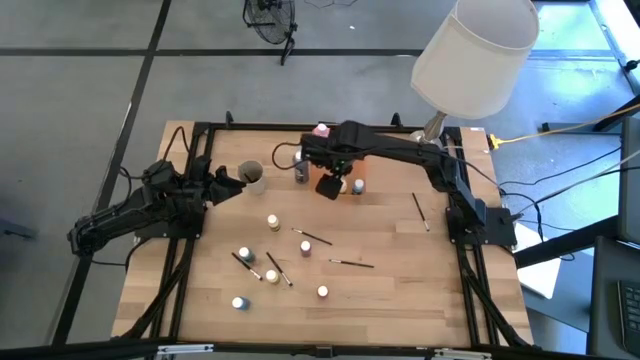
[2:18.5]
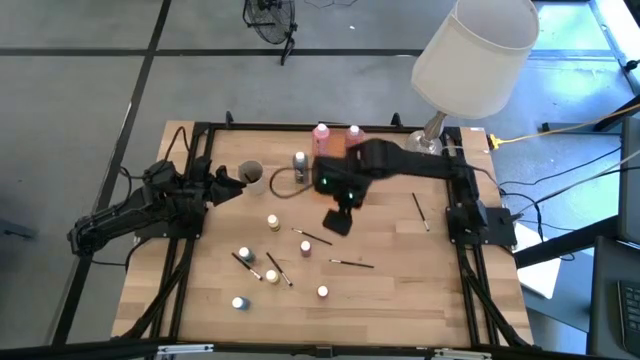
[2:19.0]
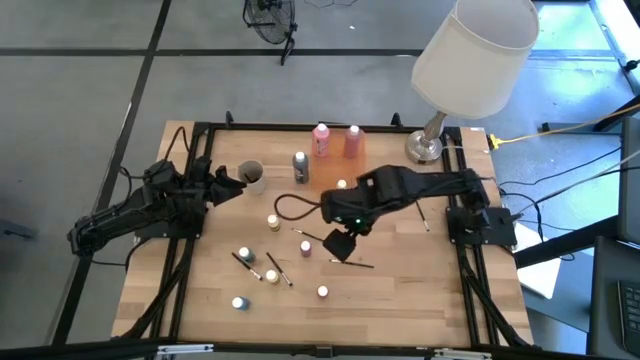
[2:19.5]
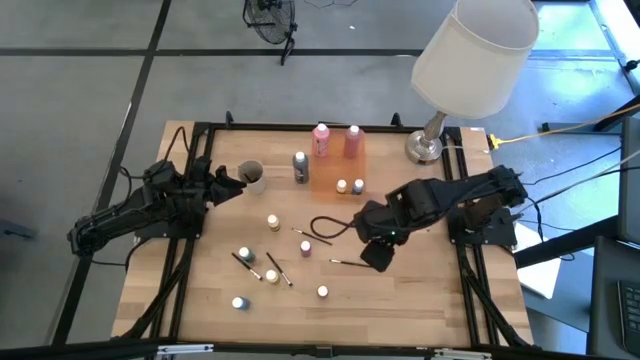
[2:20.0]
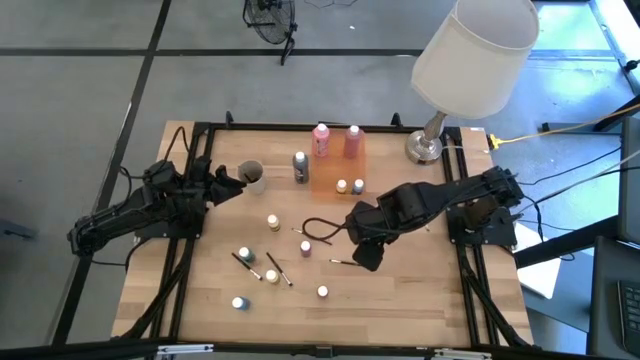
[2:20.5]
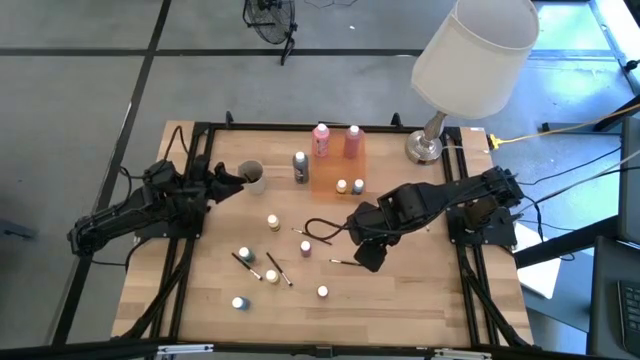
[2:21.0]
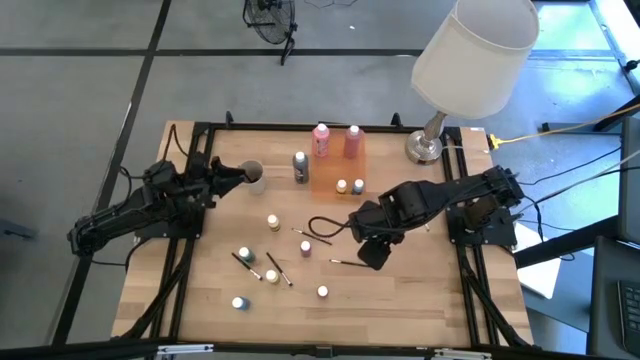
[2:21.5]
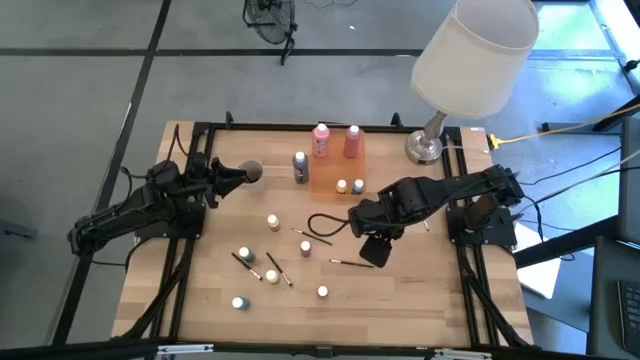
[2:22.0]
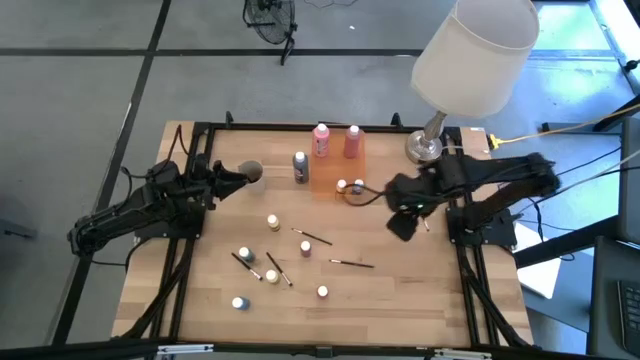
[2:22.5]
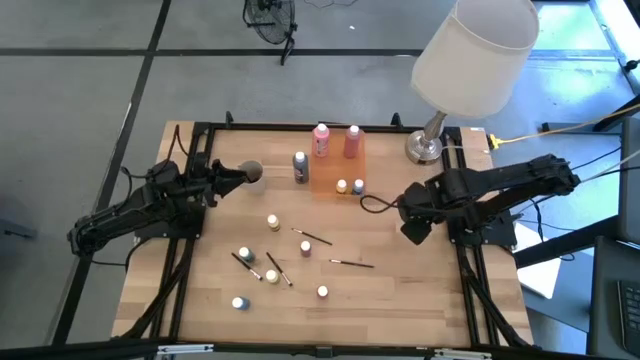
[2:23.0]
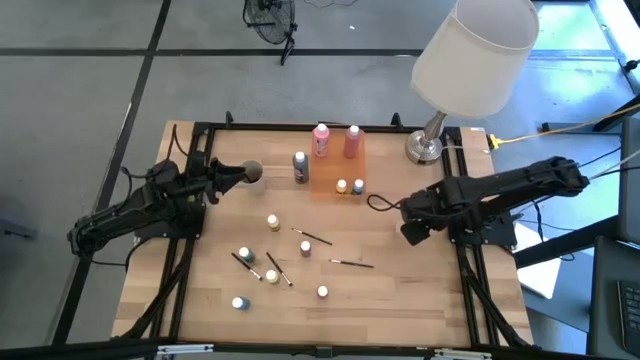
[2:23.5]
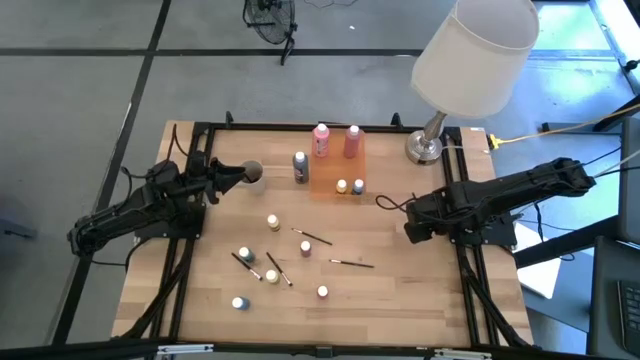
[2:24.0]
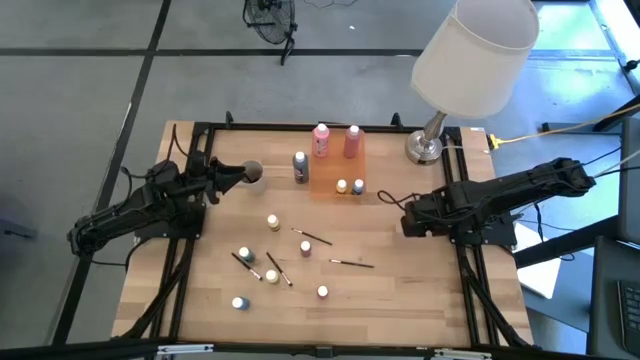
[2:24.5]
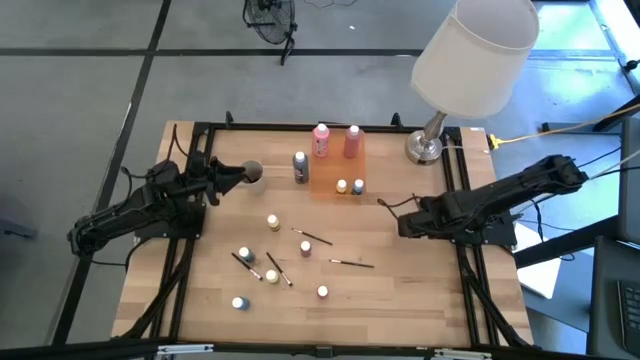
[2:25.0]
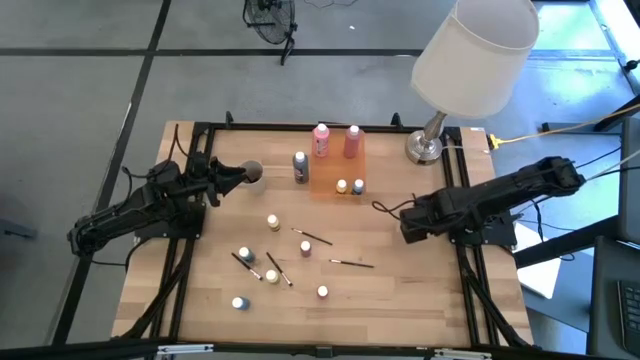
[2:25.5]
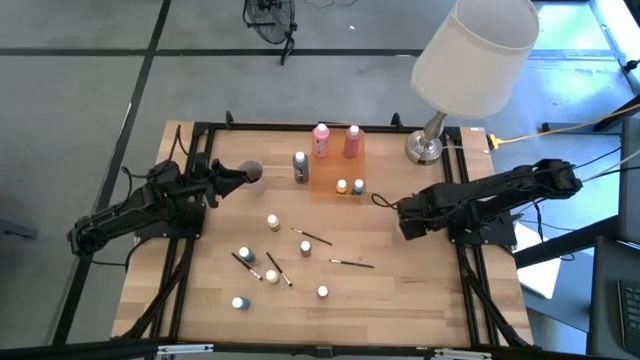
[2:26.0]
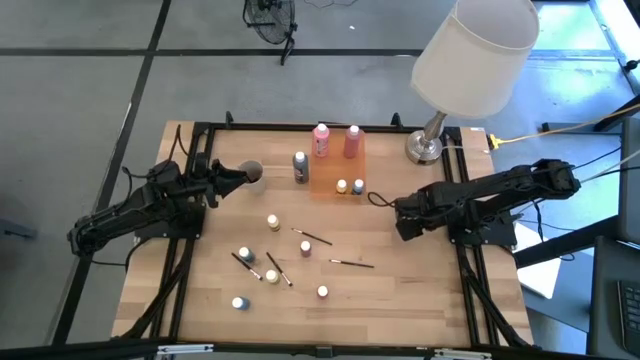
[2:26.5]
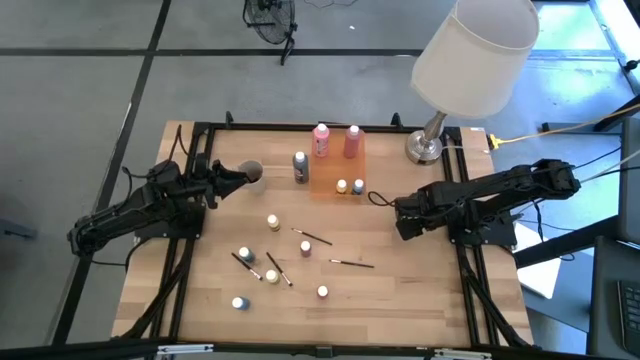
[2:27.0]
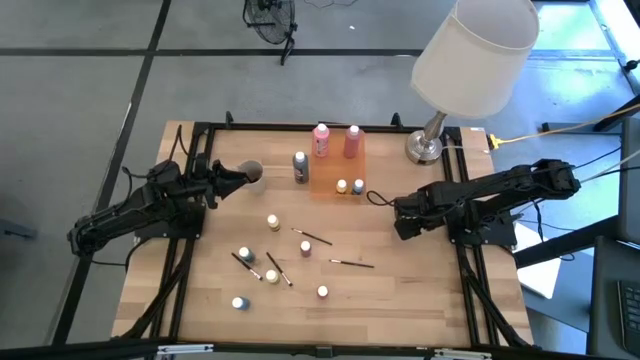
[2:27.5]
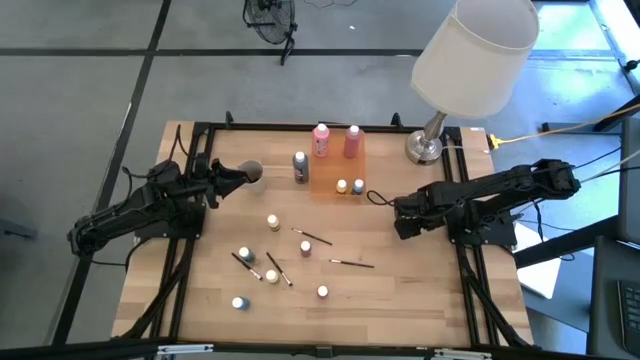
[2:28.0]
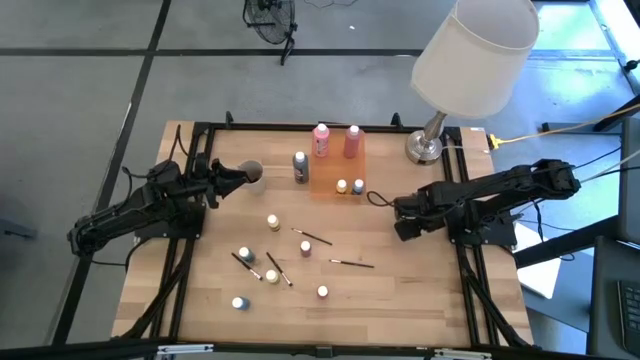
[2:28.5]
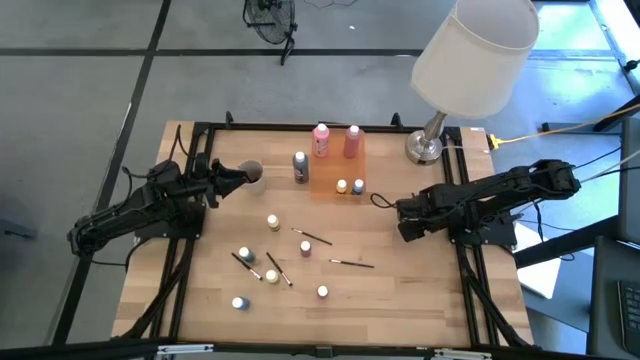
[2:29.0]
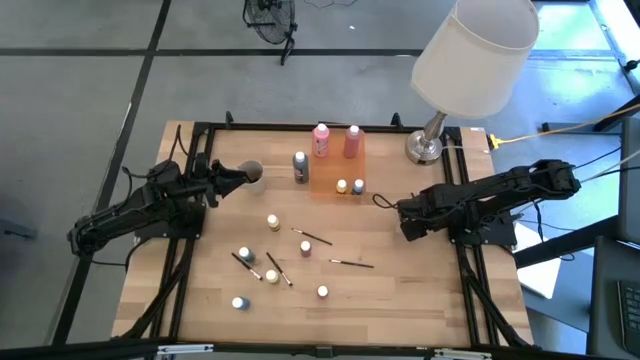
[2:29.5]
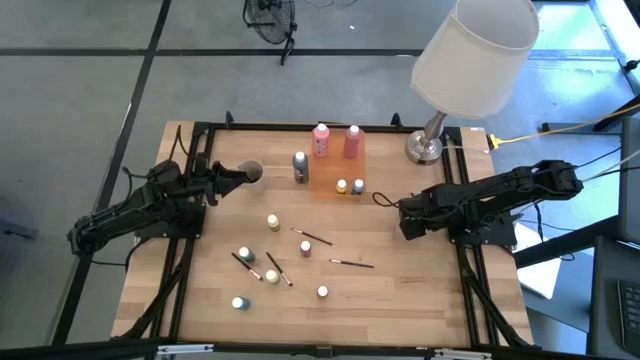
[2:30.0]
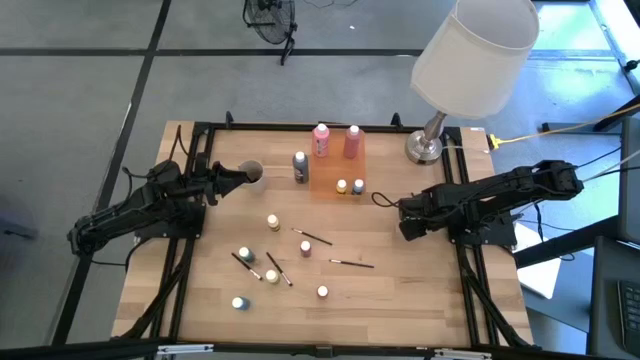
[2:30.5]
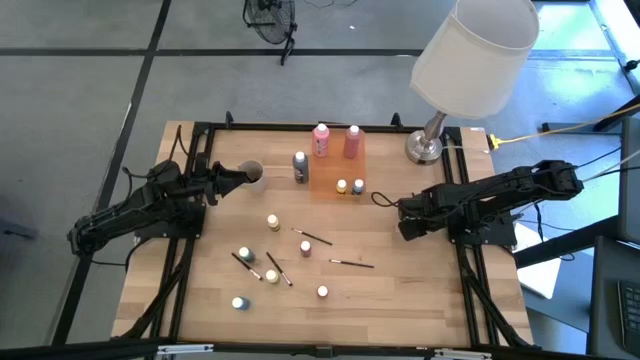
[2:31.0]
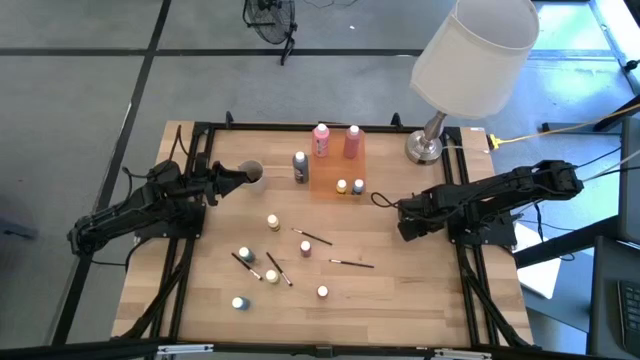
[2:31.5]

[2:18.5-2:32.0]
Task: Pick & Place Paint Supplies
Put the silver paint brush into the white cup

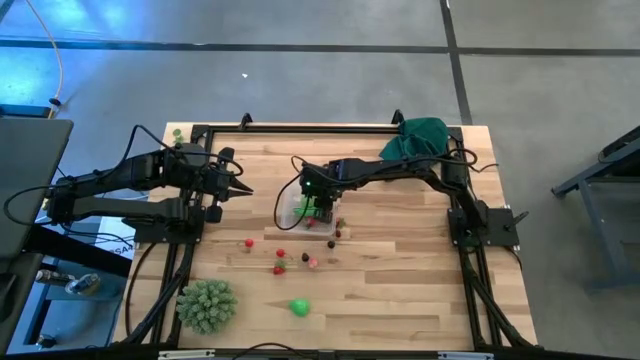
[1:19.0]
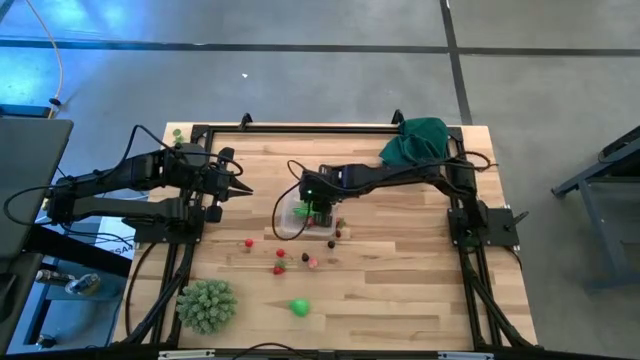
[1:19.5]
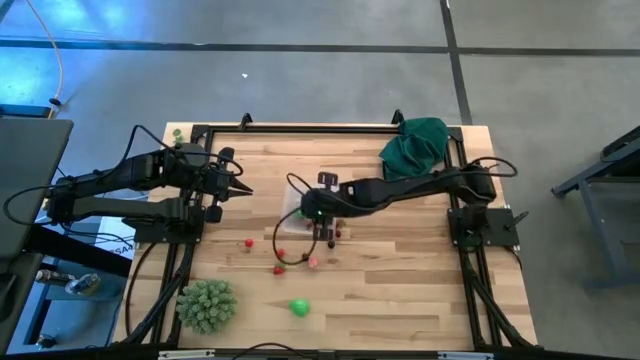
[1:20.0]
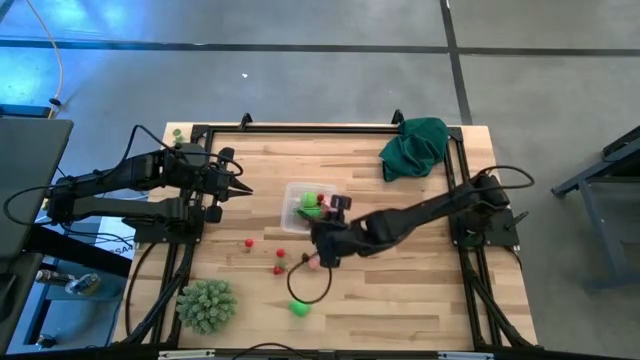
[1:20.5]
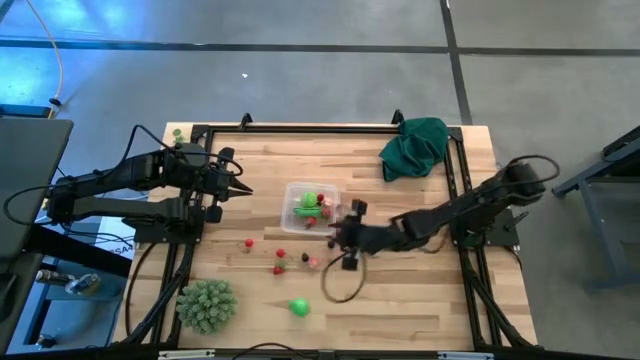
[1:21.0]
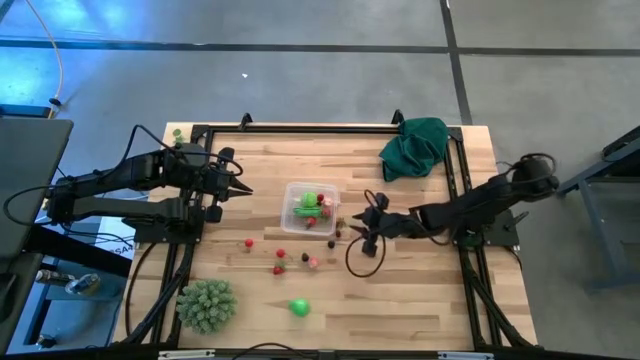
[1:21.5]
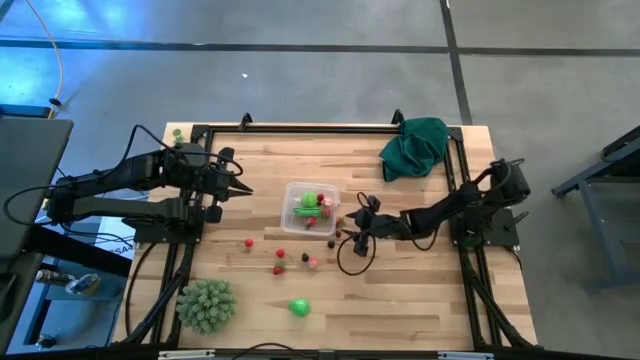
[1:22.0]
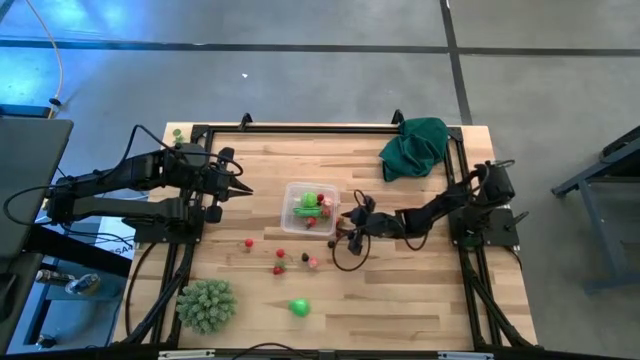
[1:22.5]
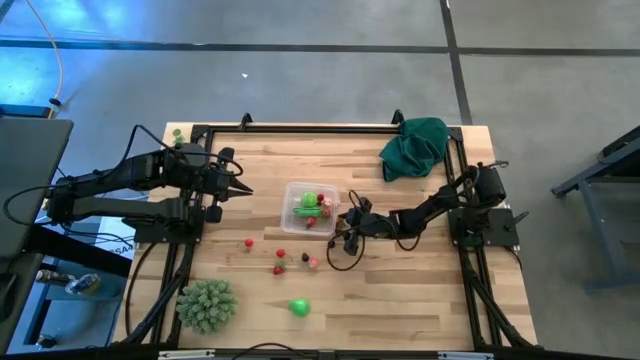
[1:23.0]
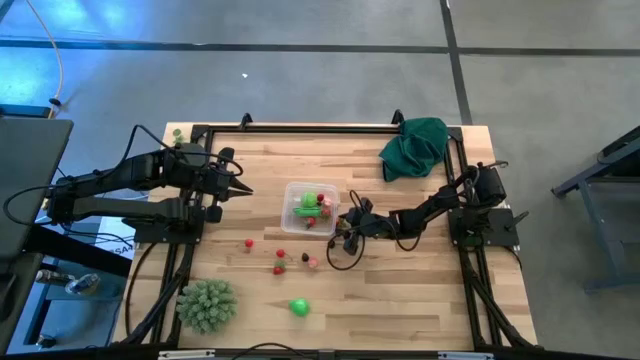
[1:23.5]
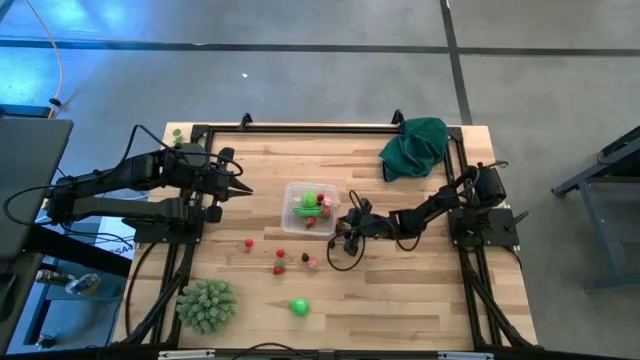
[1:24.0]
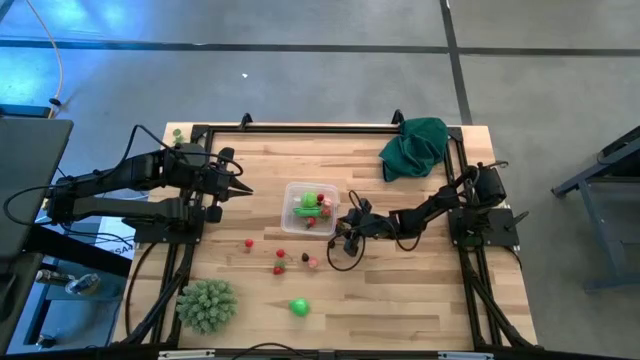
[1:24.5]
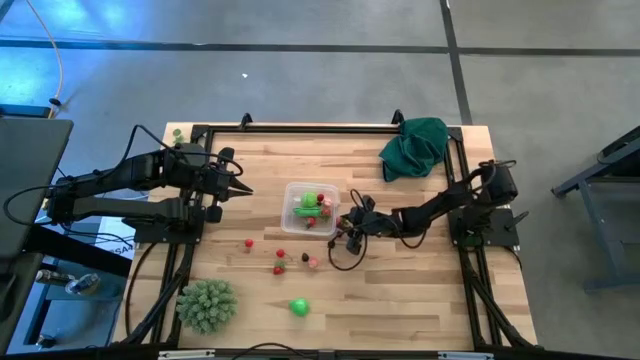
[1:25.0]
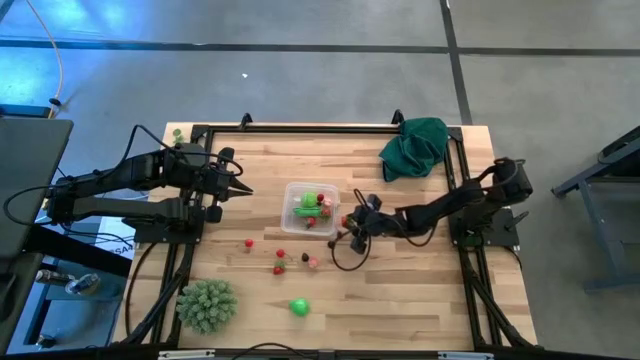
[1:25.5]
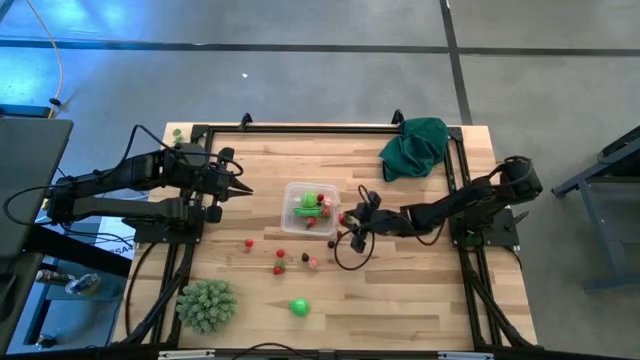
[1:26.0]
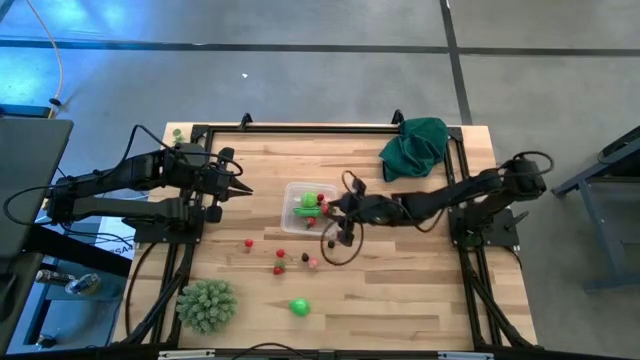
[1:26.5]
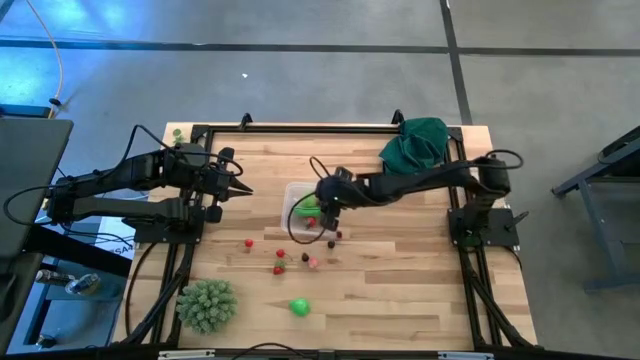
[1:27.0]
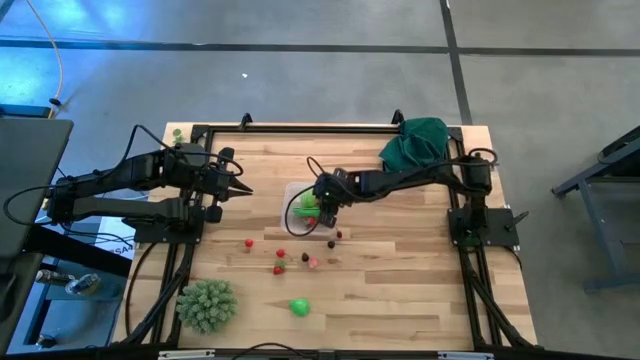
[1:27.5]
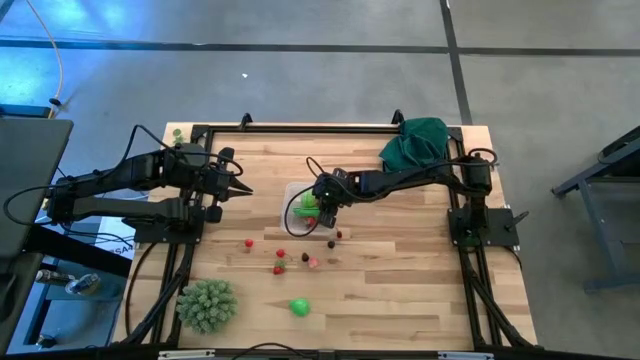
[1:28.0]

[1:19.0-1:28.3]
Task: Pick and placing Produce into tupperware
Put the red strawberry into the transparent container
